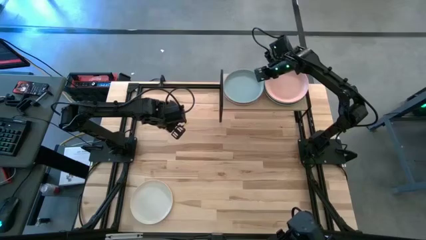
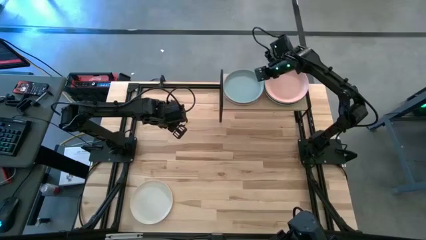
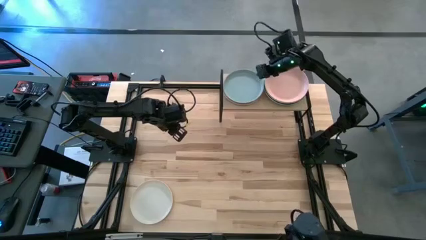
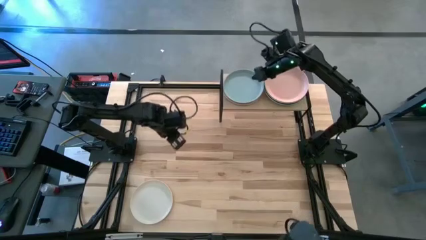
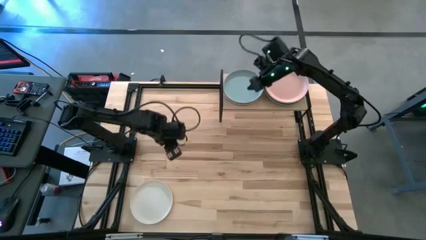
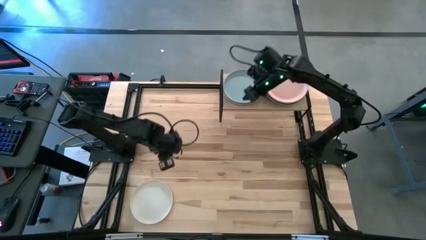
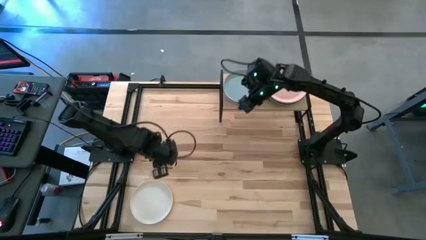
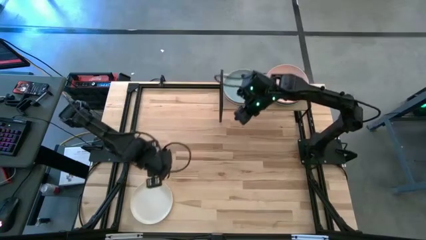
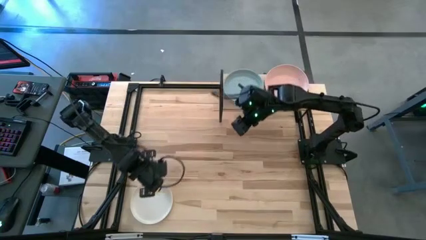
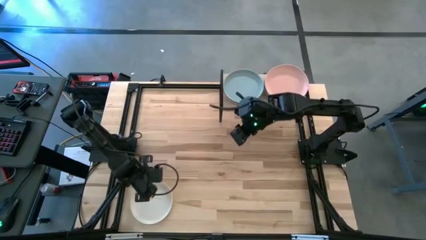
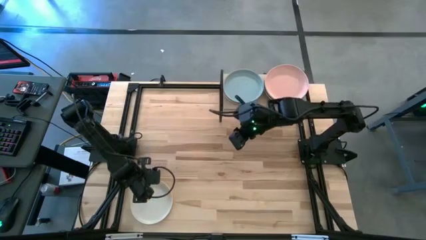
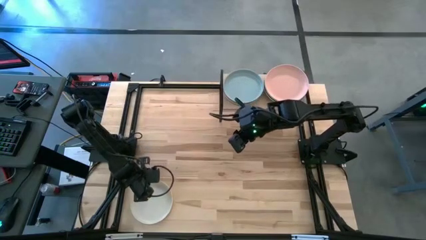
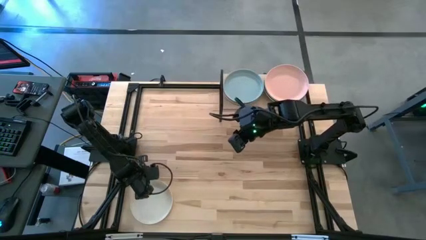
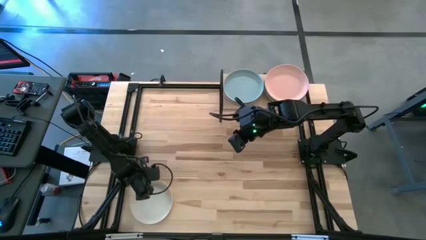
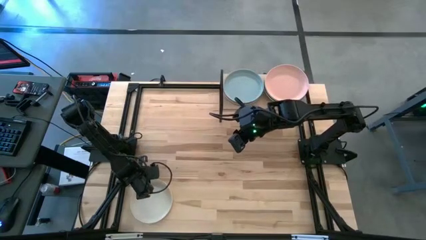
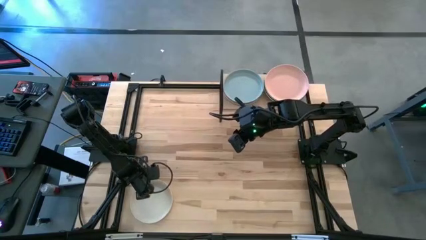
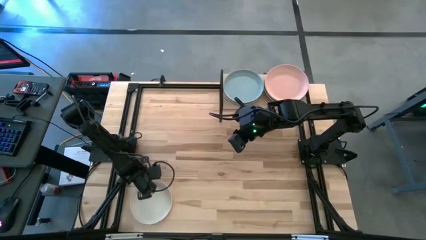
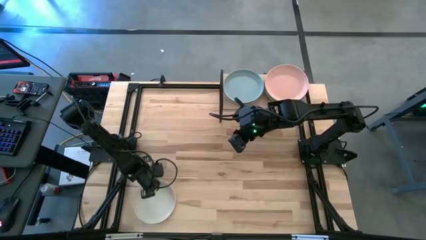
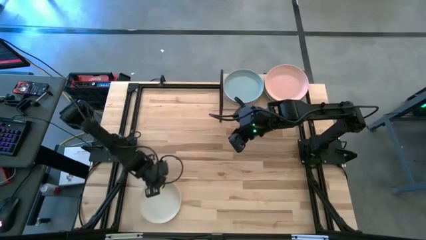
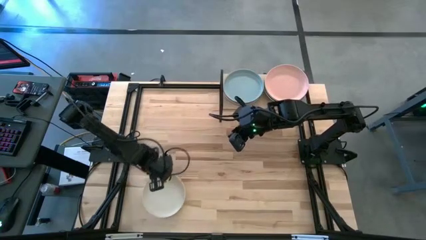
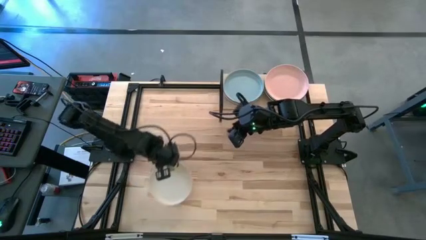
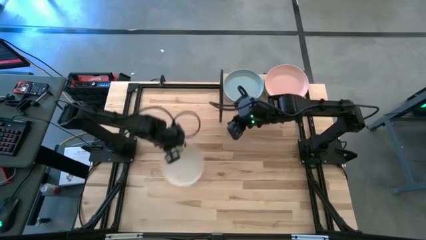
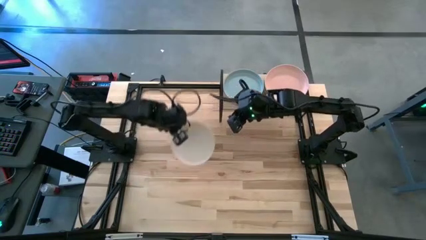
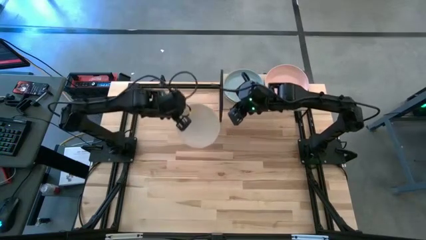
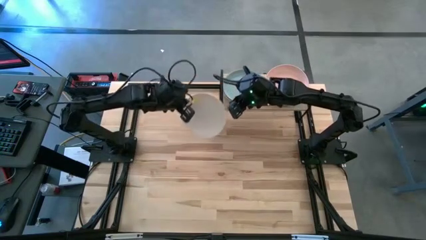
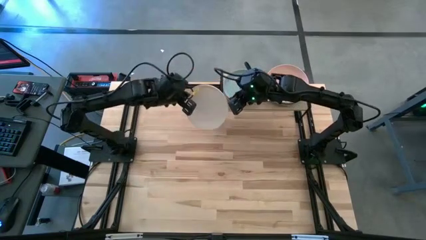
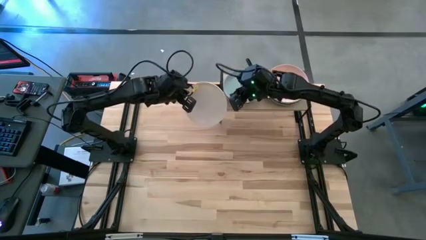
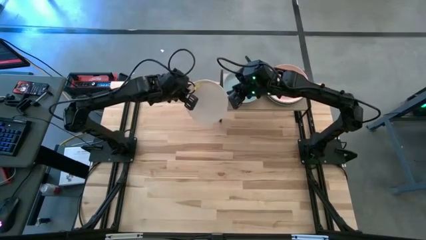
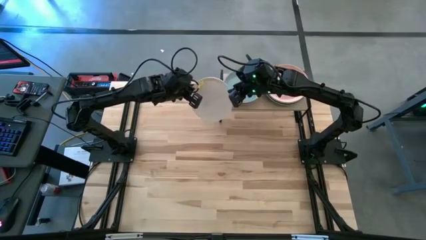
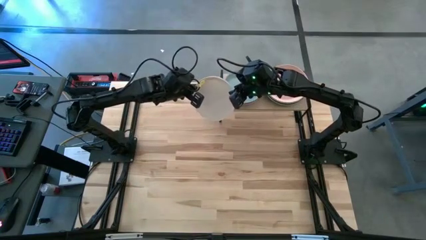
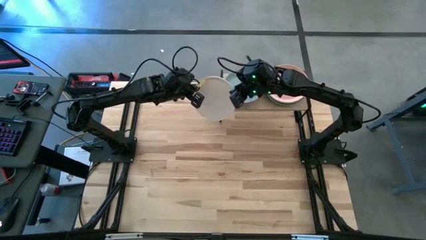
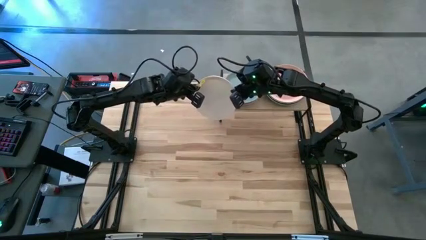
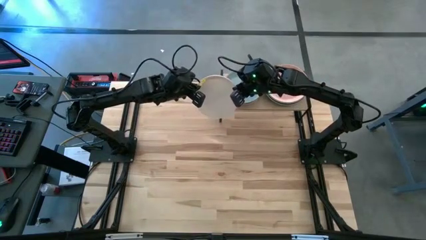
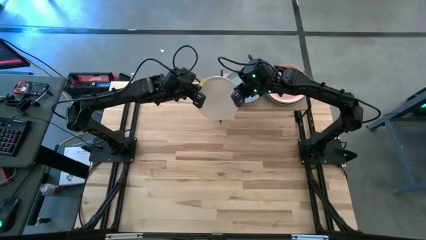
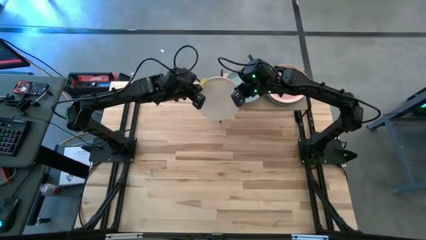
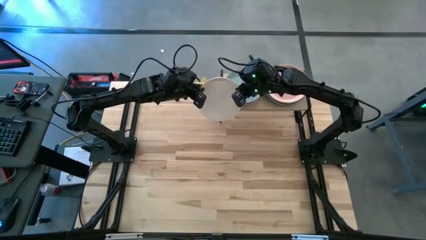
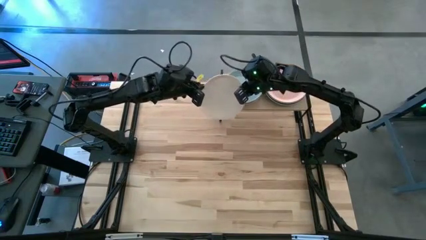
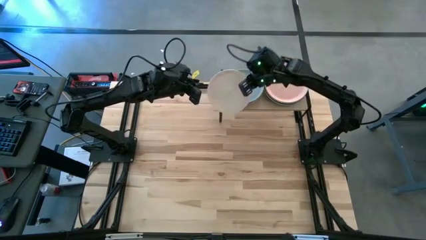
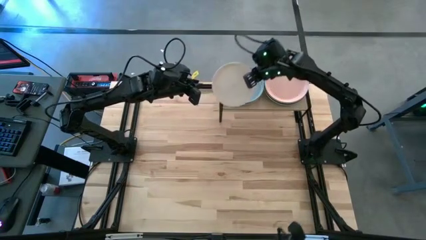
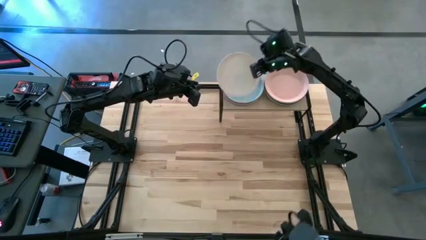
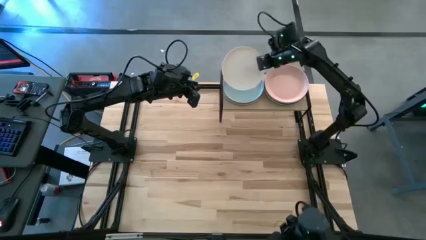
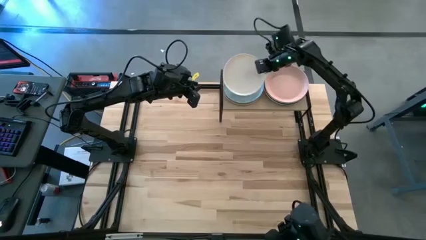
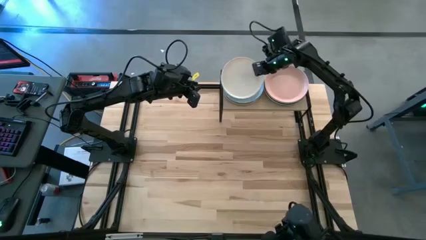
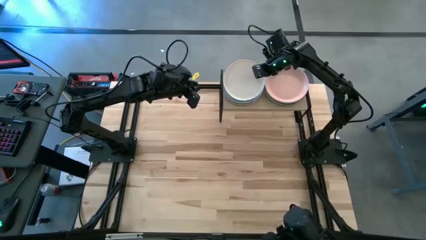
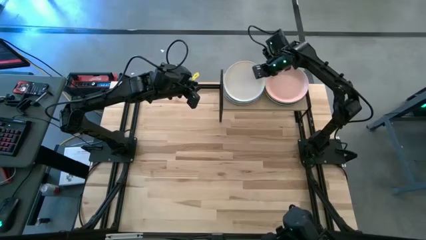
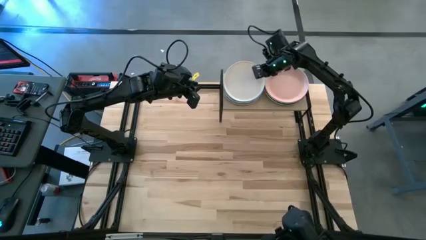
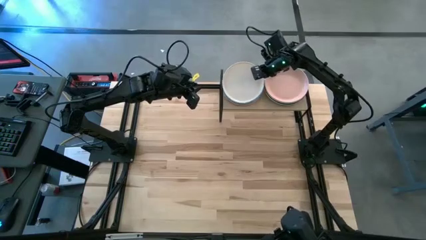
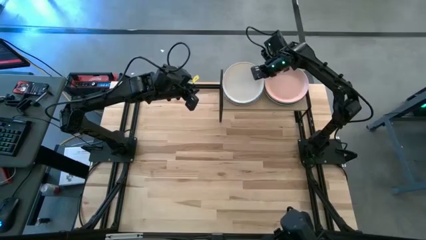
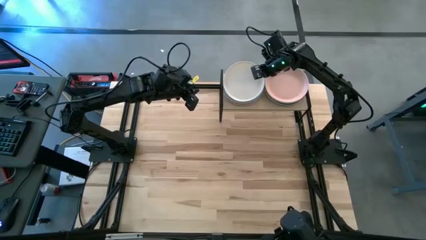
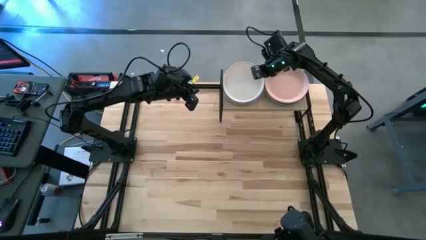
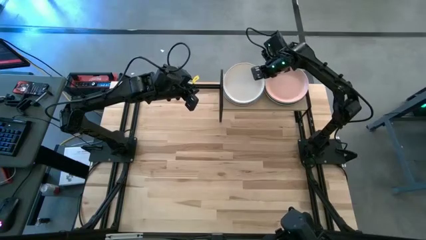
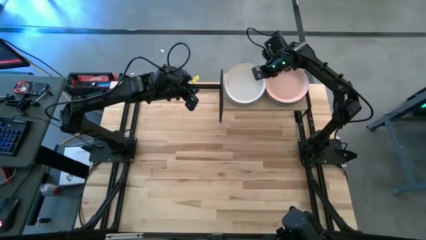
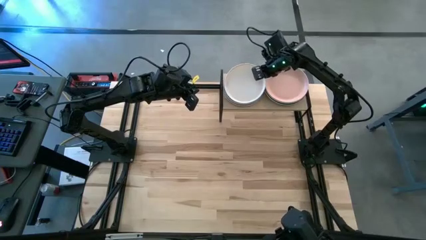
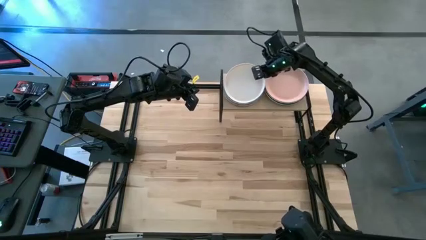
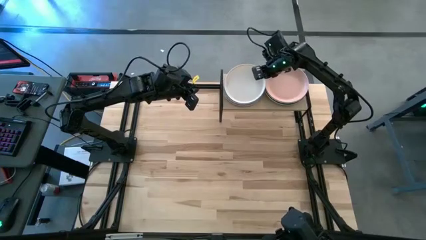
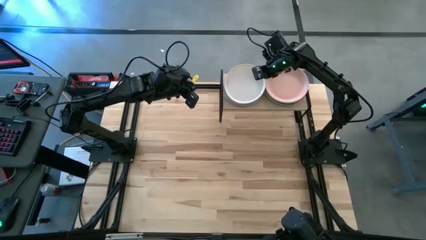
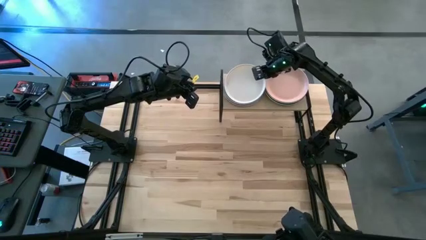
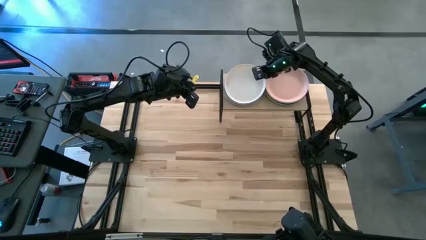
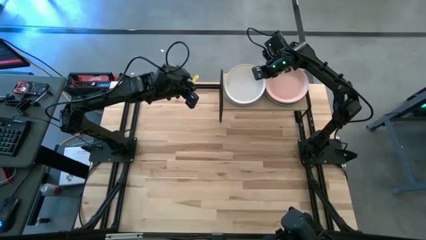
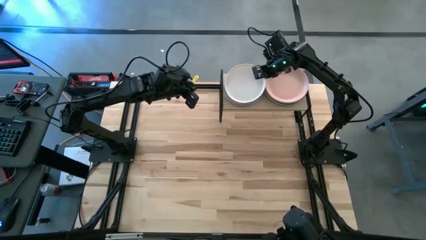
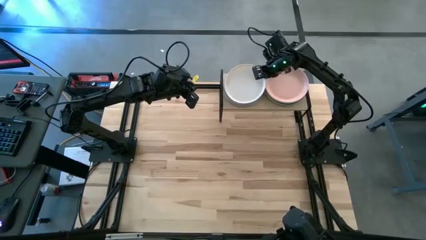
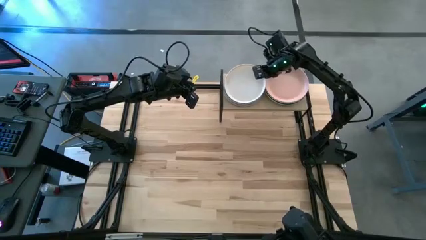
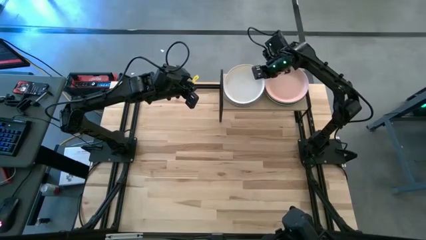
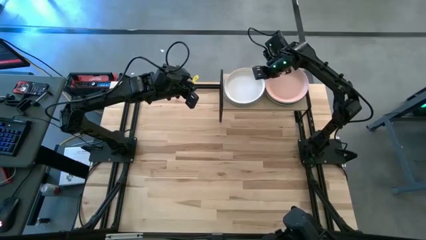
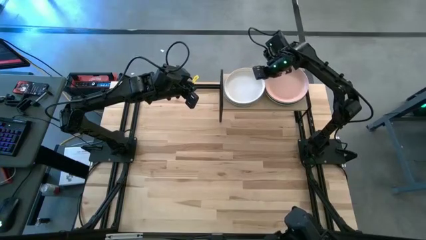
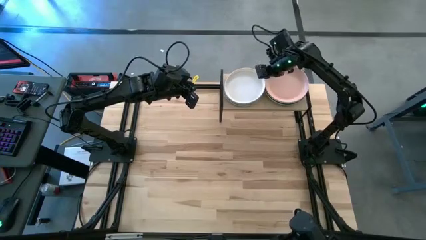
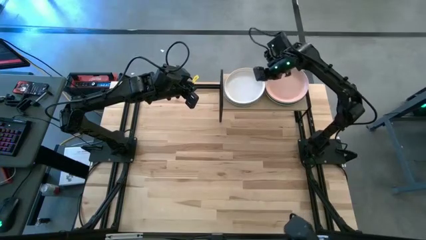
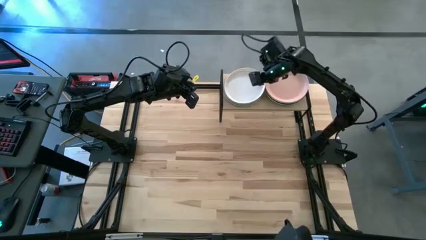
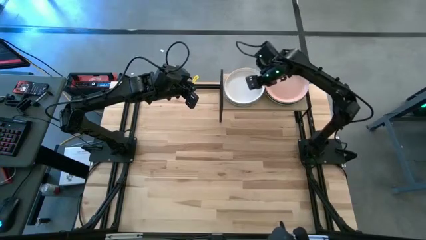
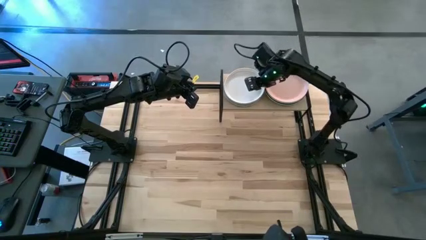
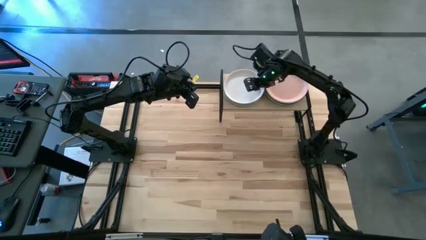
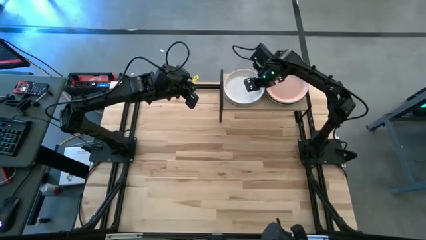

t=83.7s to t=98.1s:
Task: Place and stack plates onto a shelf
Stack the white plate on top of the light blue stacked plates on the shelf
